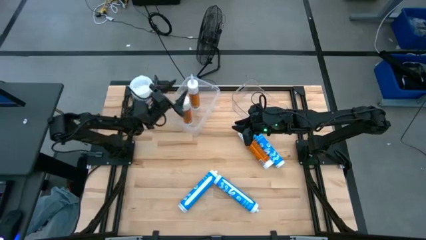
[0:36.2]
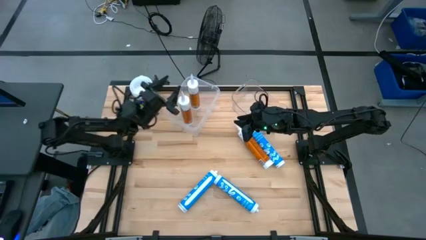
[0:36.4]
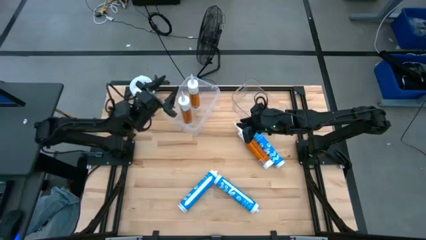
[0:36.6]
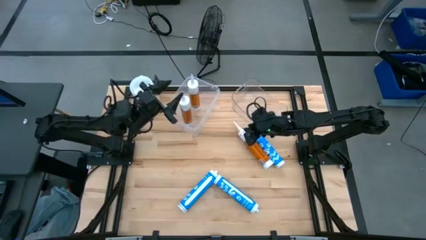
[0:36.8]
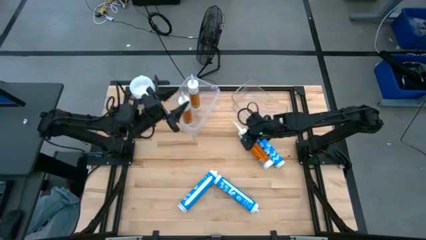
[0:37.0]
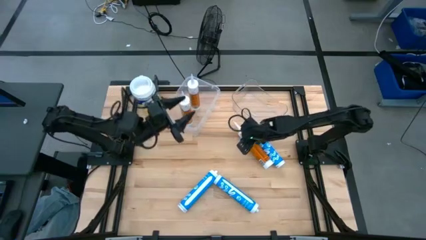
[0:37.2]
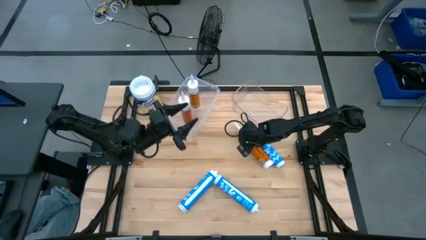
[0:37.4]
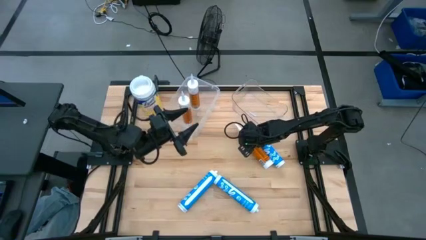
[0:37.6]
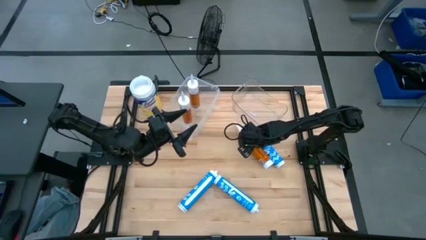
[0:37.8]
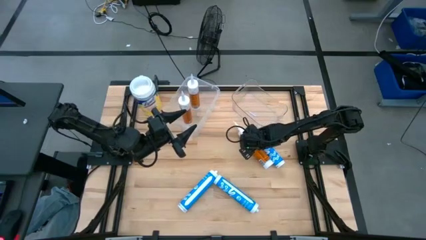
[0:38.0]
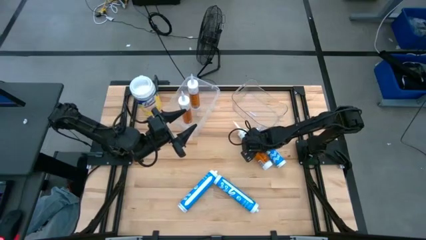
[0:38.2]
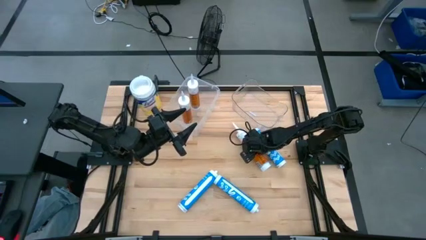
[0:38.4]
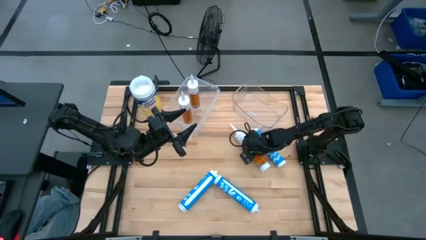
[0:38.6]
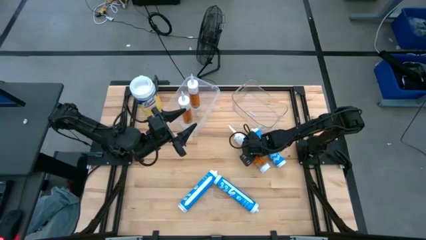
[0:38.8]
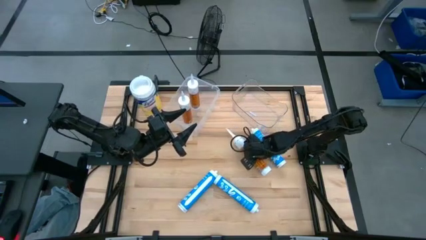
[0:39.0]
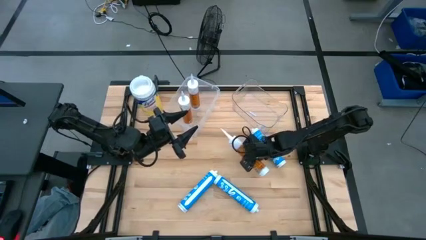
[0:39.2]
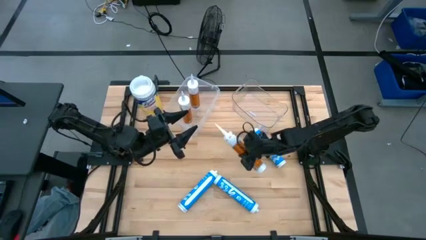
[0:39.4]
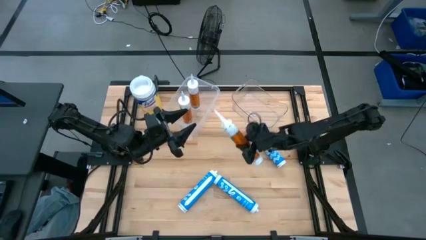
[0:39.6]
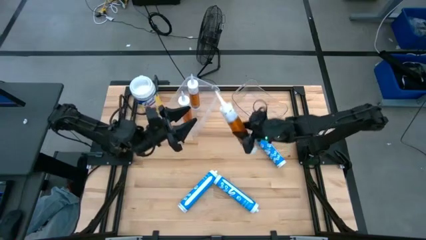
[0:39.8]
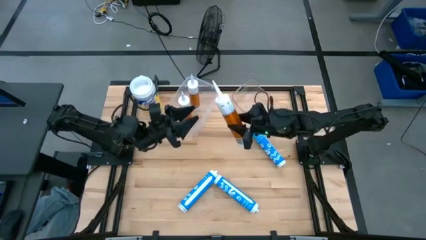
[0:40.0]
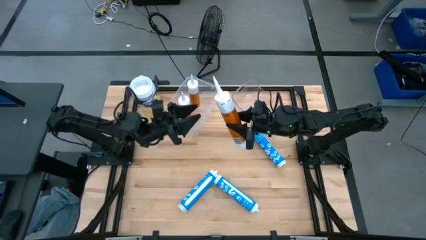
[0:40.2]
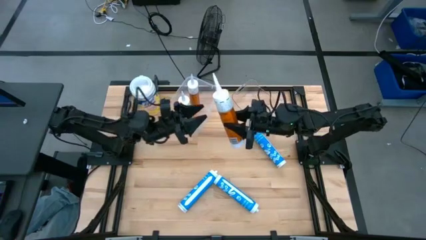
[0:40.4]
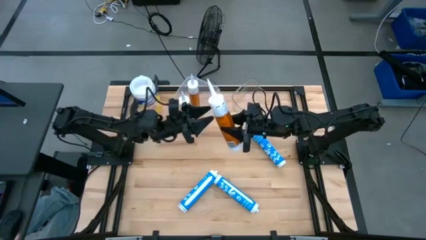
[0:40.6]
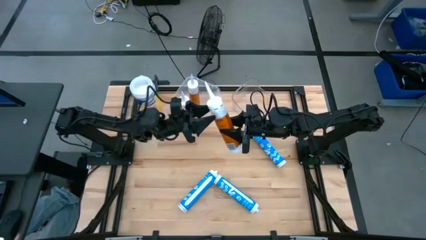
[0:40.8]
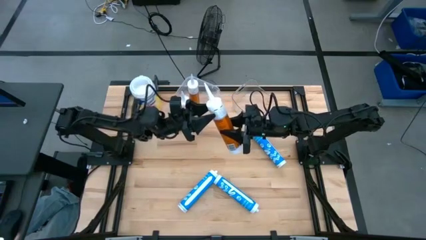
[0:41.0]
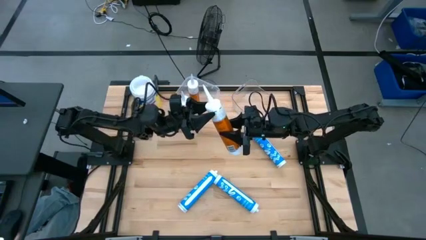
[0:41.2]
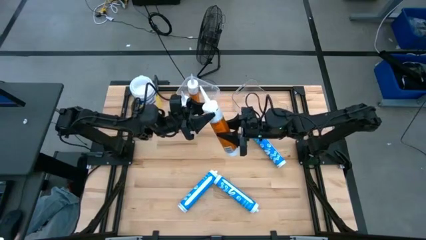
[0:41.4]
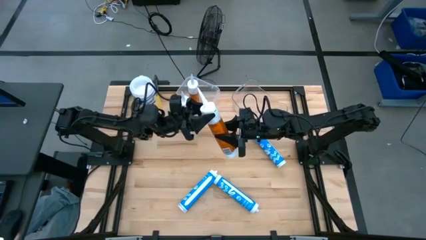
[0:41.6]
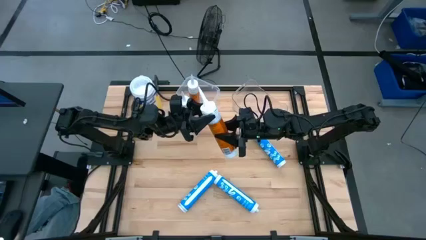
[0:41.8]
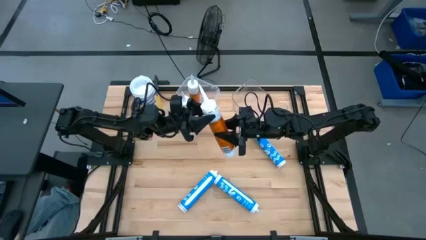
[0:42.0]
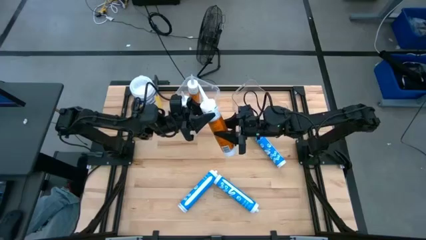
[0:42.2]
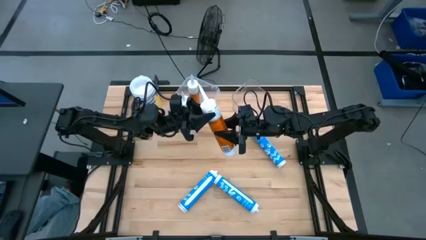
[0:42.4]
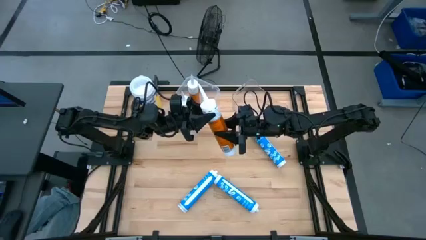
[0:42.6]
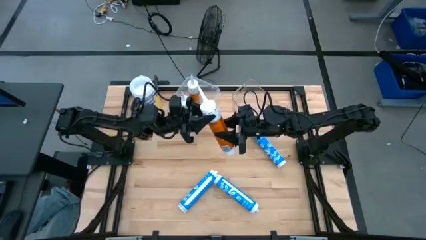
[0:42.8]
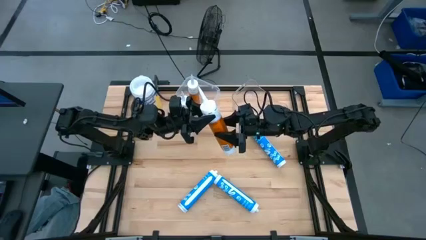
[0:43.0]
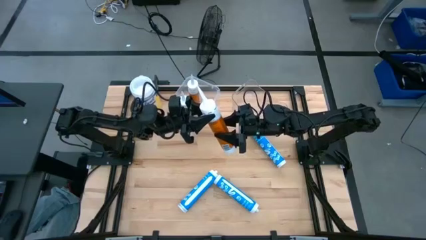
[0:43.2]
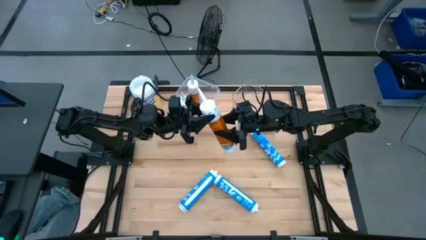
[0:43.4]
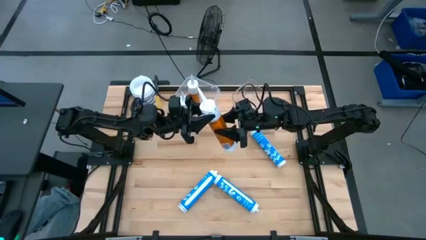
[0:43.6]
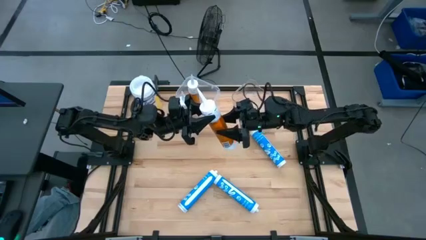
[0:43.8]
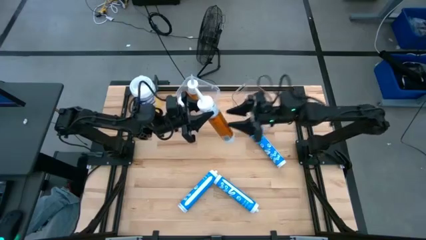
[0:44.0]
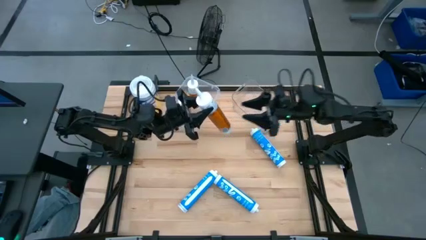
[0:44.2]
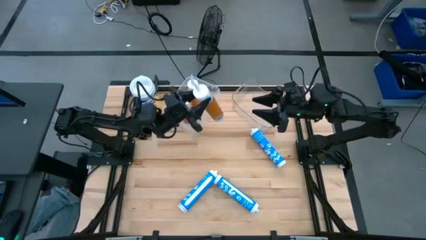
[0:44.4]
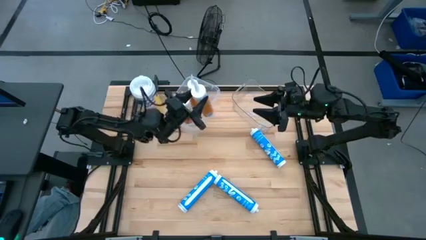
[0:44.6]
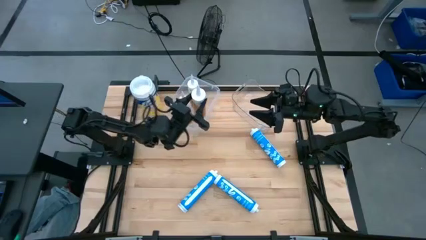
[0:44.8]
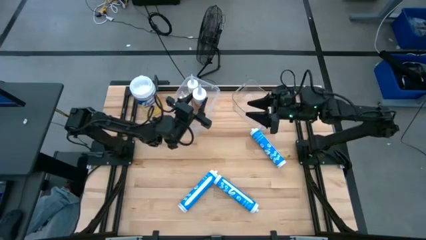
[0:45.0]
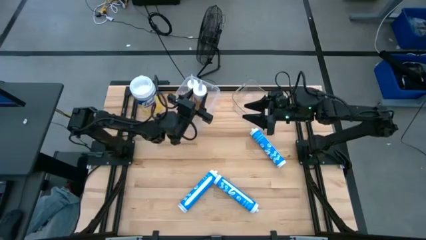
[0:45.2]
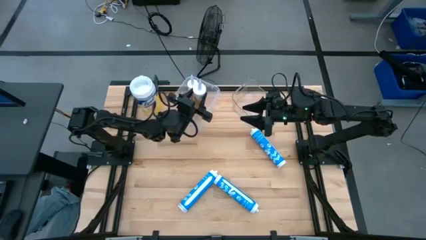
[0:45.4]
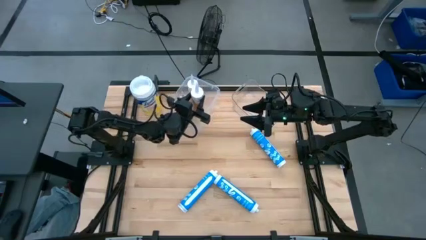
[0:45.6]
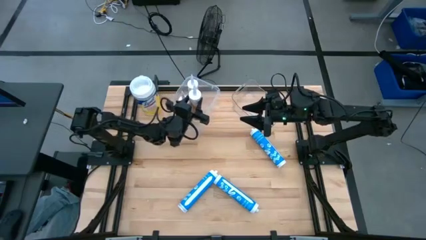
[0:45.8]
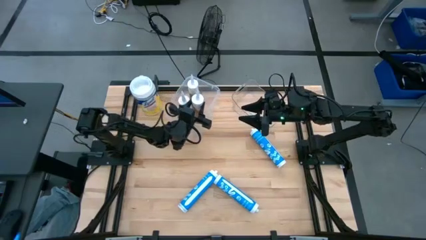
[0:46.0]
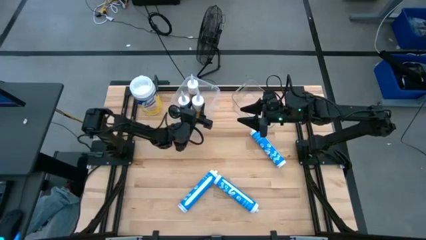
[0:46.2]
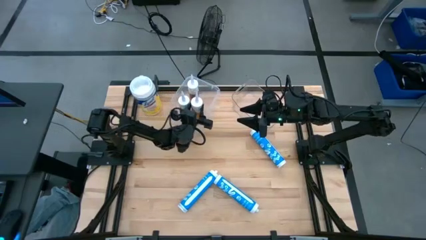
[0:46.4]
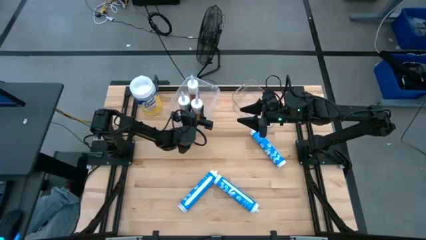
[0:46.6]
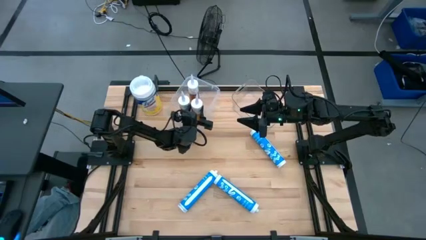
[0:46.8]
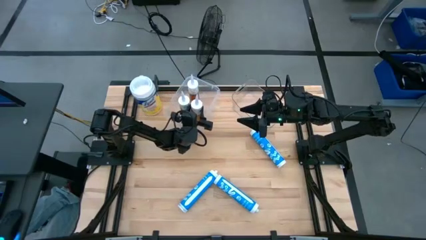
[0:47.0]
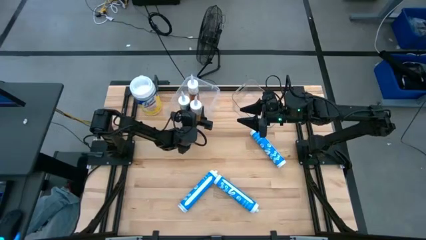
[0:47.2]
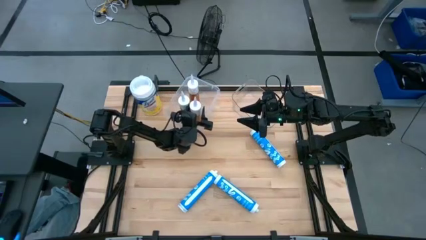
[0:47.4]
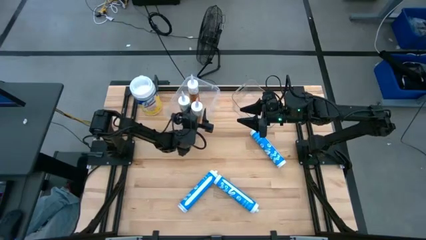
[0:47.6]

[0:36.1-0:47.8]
Task: Pick & place silicon tubes, Sealant and Lysol wipes
Put the orange sealant into the left transparent bin
